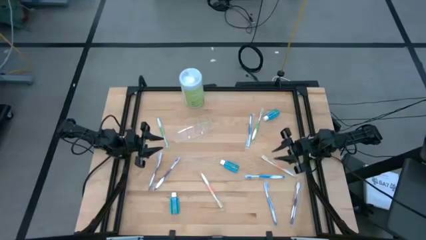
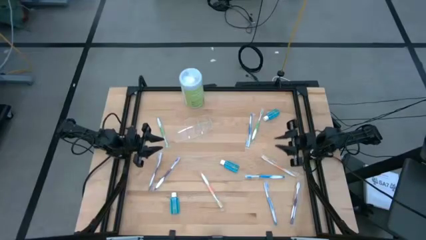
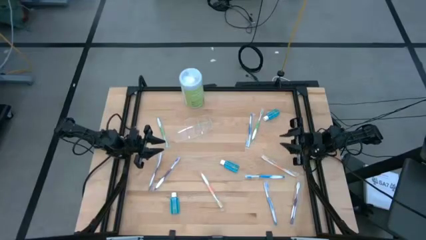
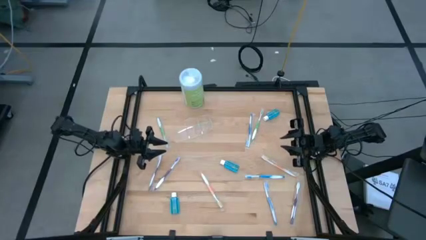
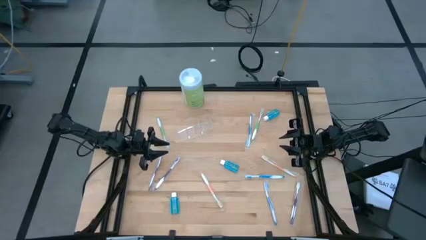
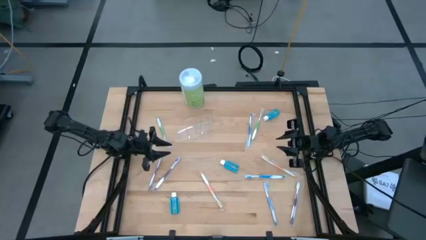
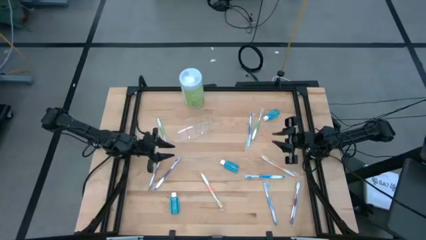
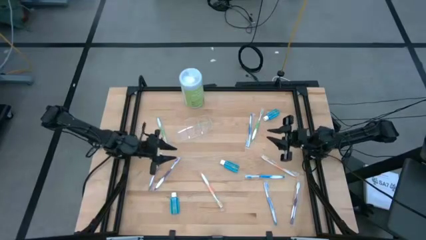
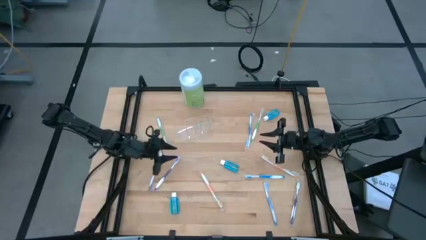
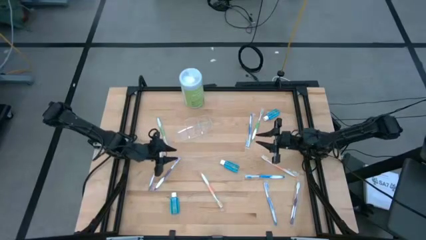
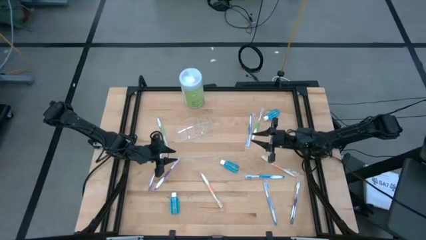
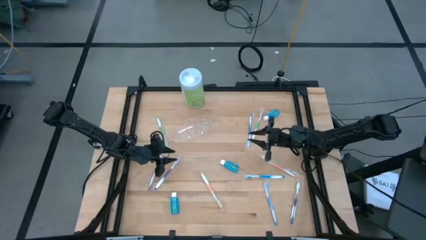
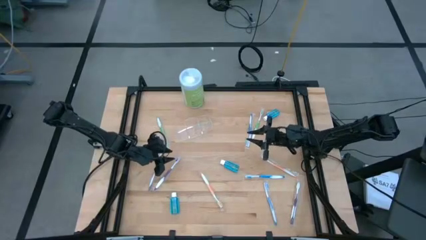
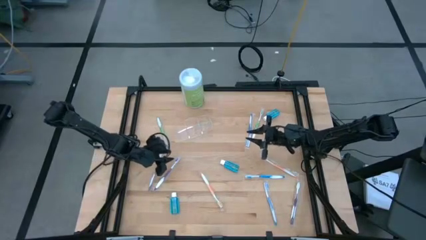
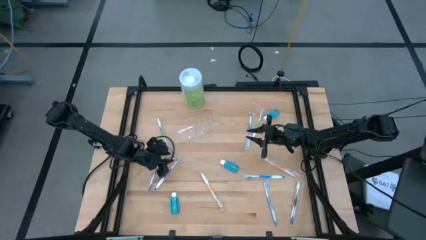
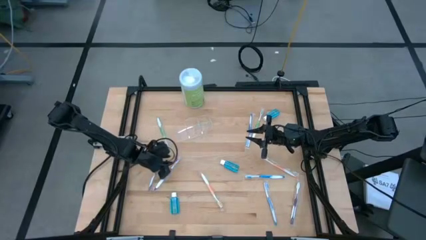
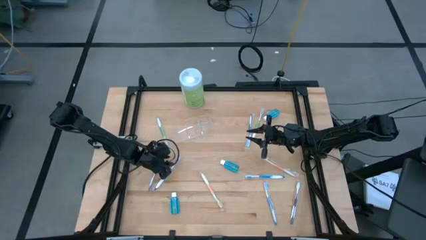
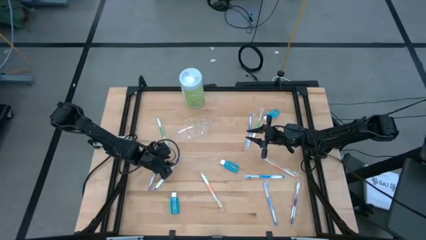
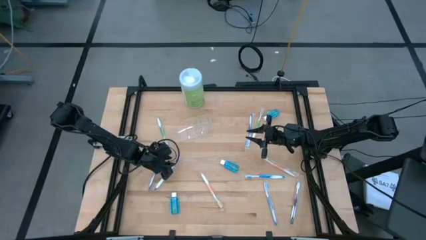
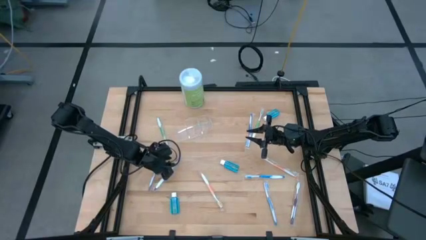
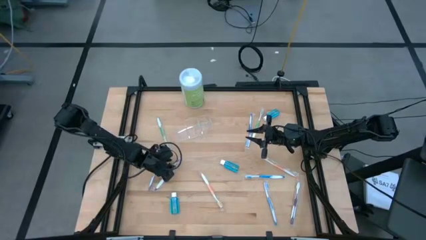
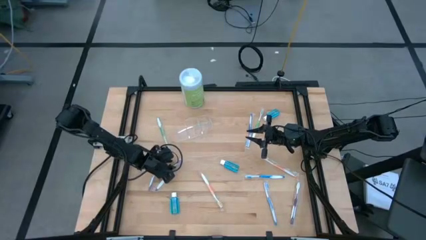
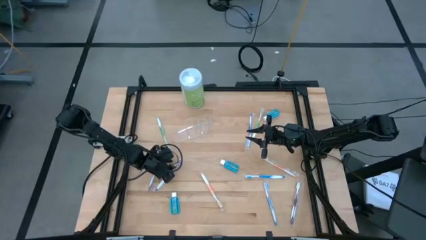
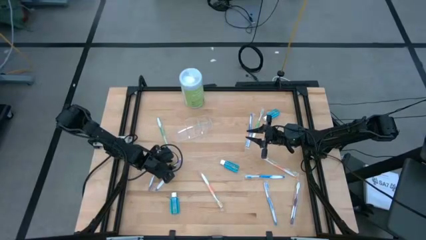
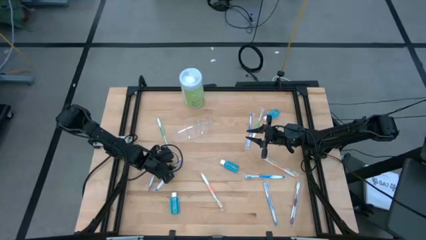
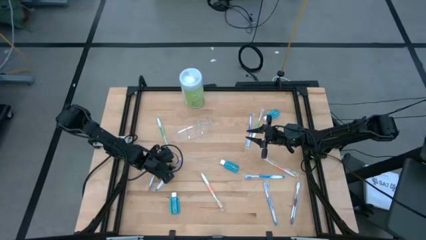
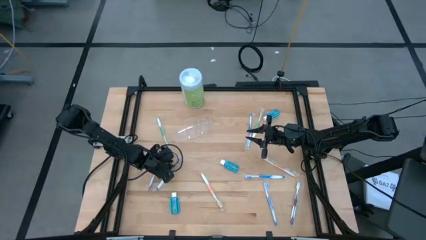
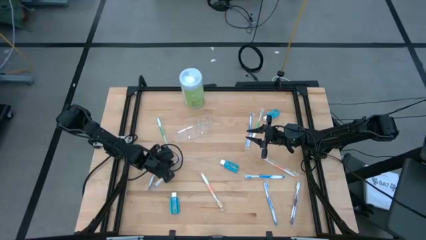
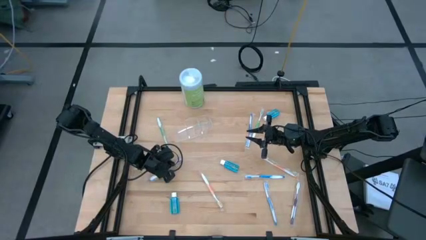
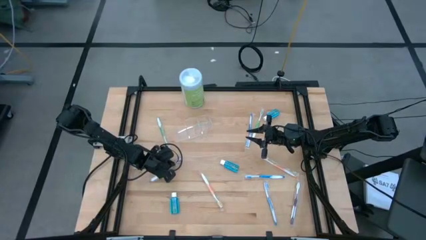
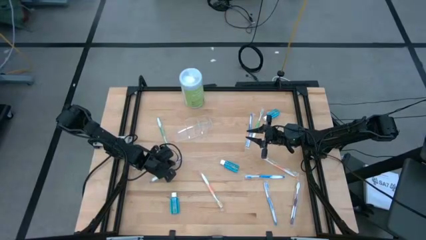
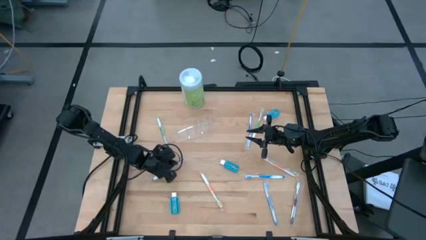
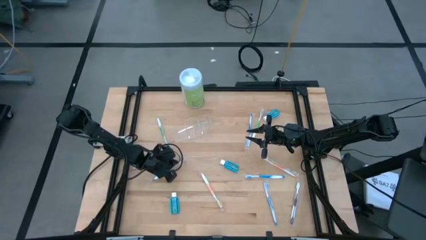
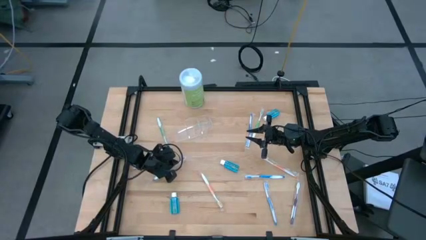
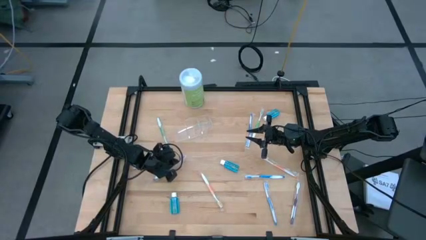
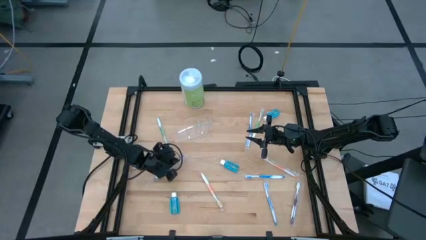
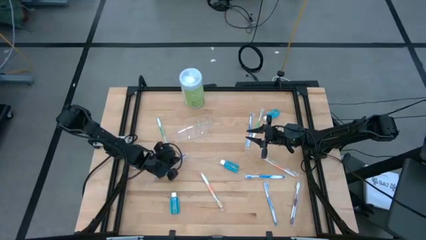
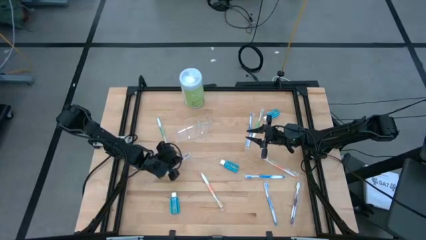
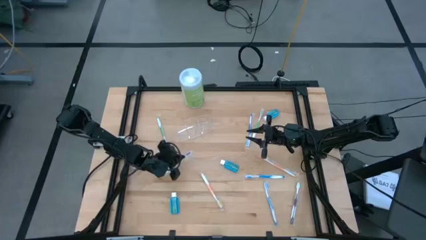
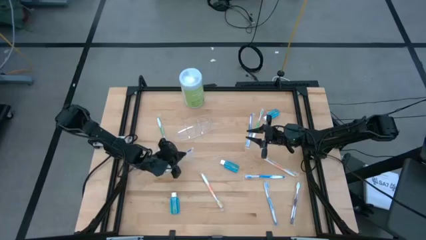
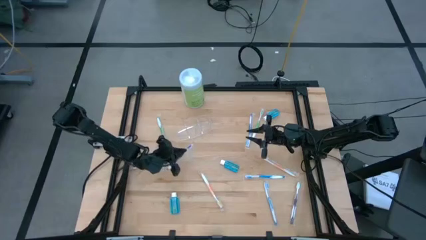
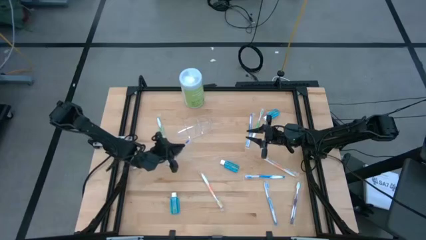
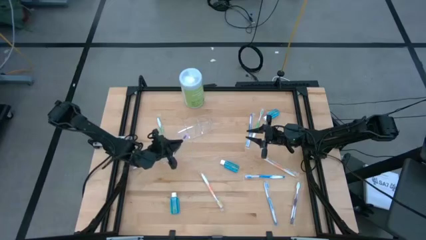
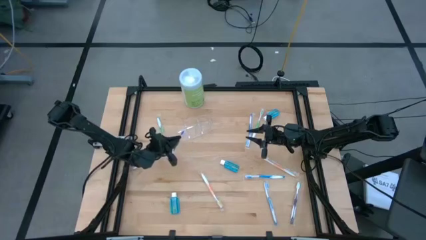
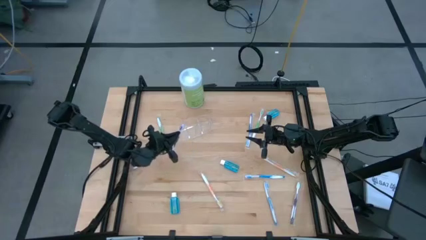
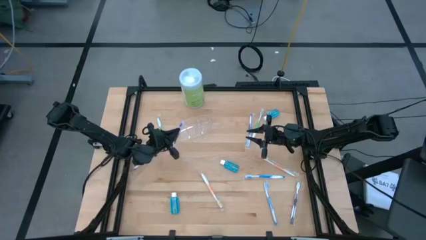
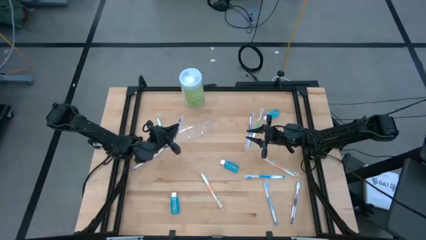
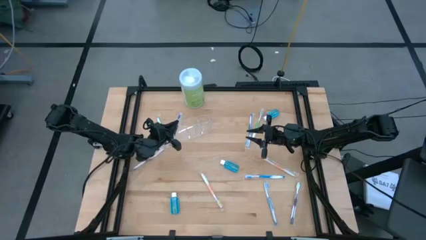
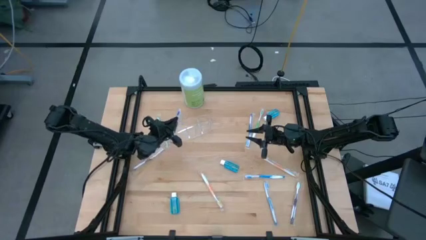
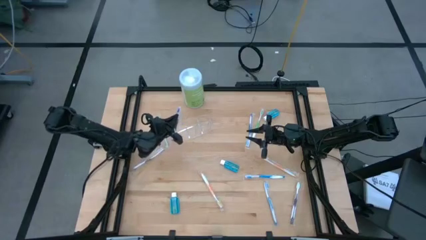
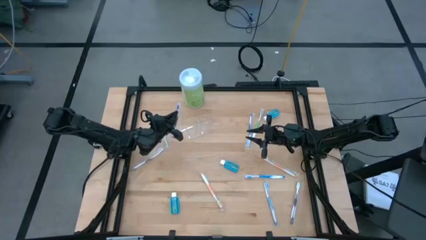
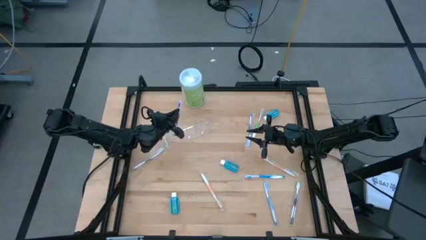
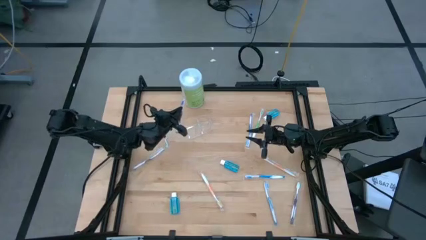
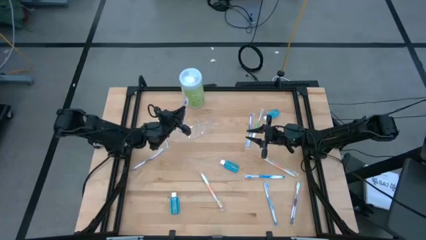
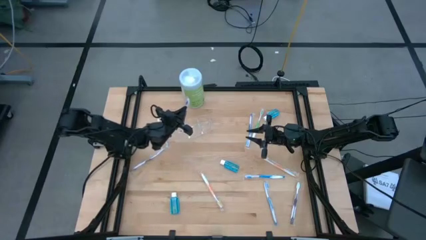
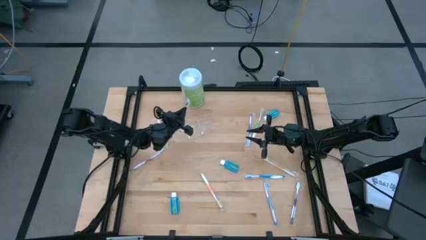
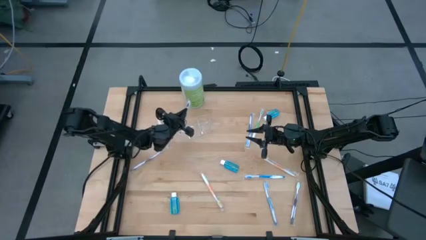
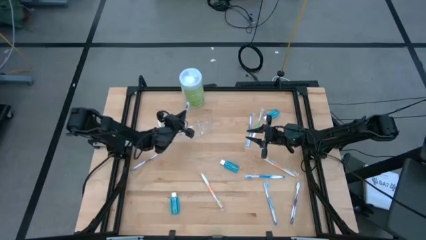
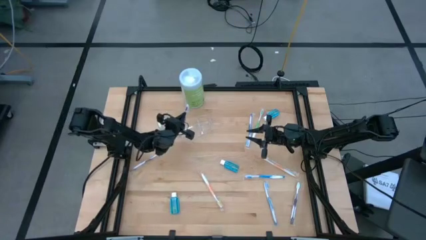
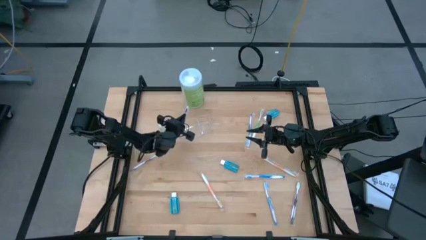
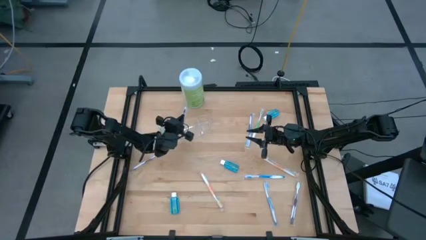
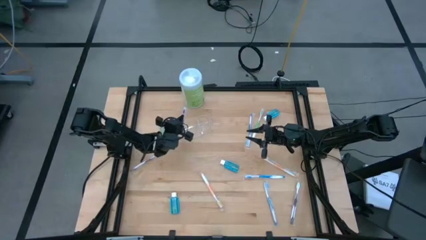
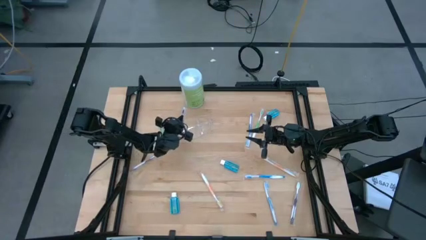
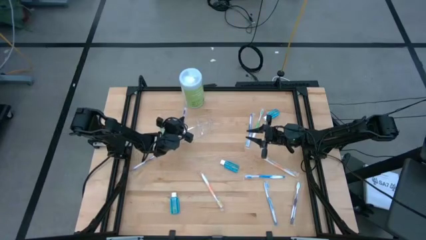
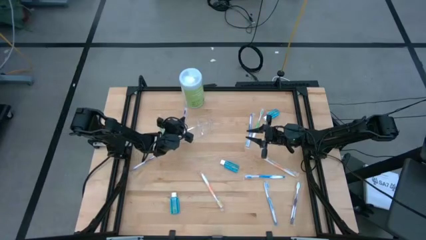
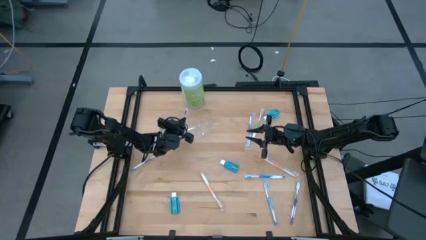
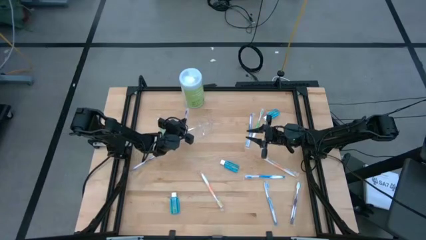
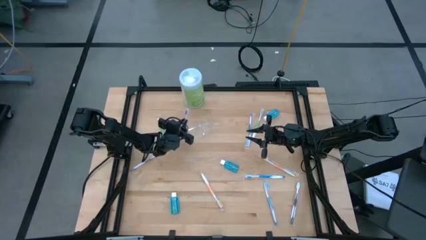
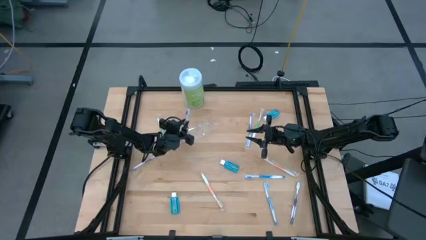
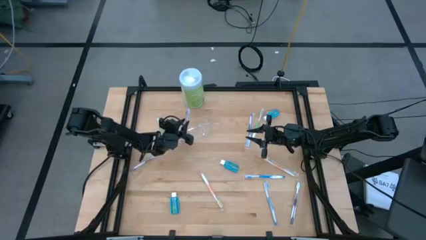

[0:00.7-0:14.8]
Task: Pick & Place toothbrushing station
Put the top right purple toothbrush into the transparent organizer
